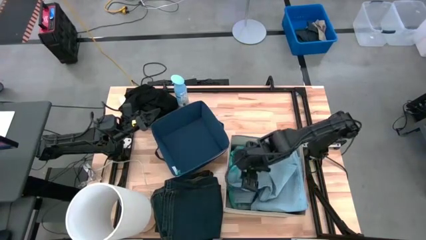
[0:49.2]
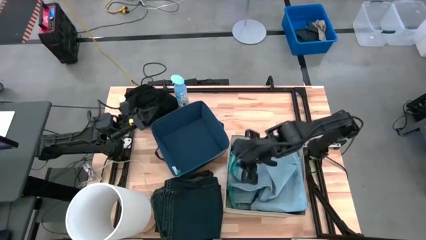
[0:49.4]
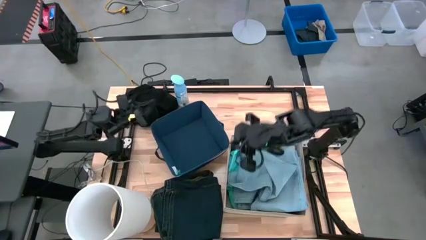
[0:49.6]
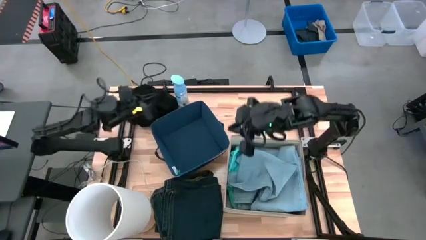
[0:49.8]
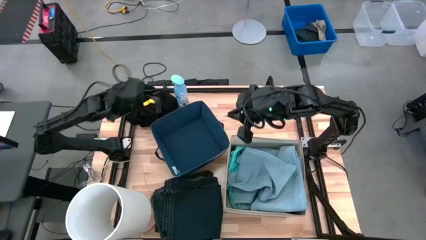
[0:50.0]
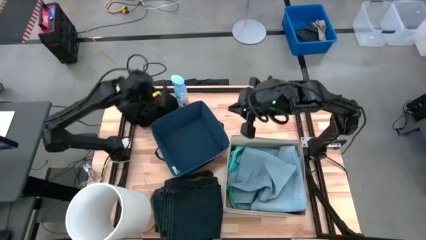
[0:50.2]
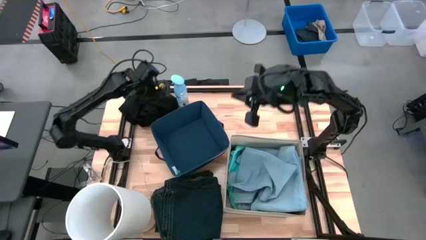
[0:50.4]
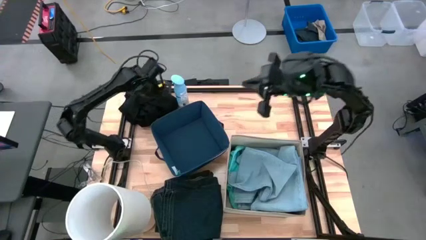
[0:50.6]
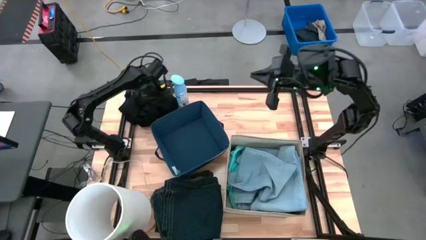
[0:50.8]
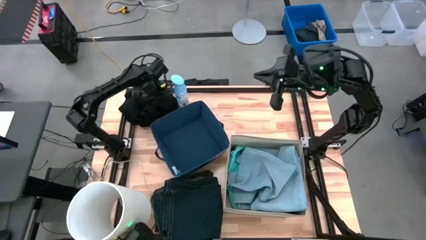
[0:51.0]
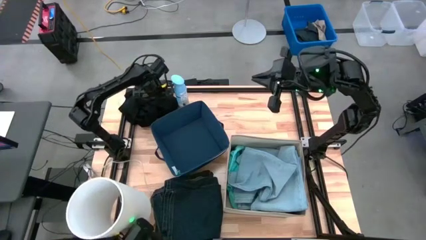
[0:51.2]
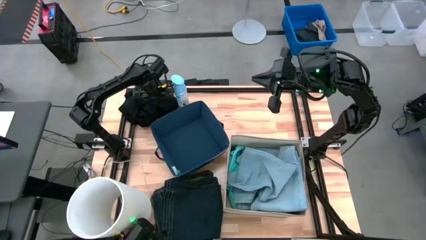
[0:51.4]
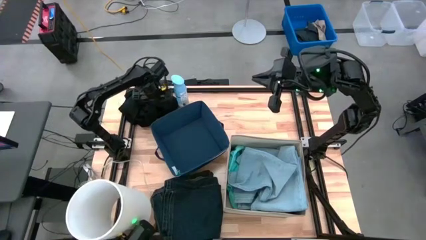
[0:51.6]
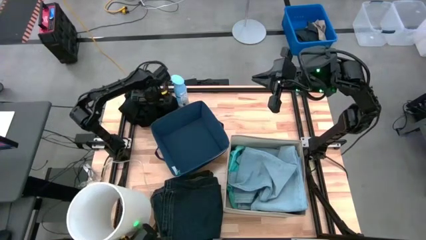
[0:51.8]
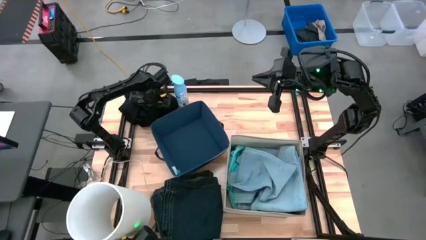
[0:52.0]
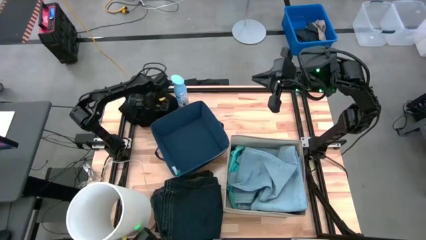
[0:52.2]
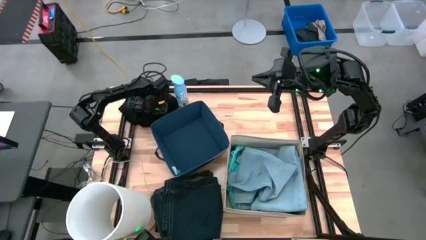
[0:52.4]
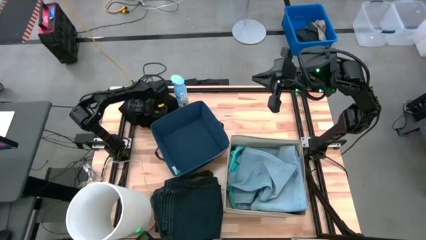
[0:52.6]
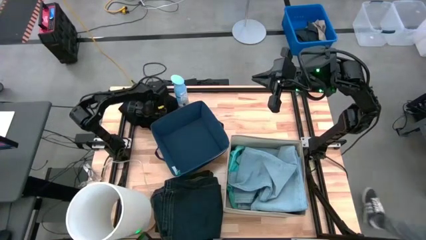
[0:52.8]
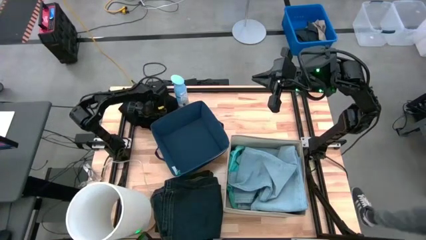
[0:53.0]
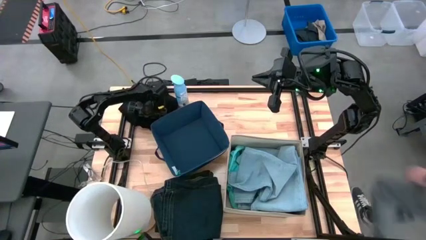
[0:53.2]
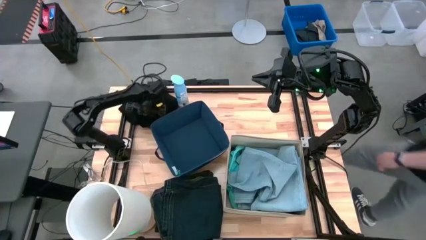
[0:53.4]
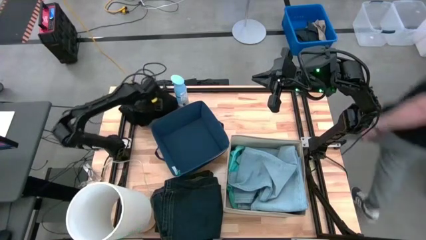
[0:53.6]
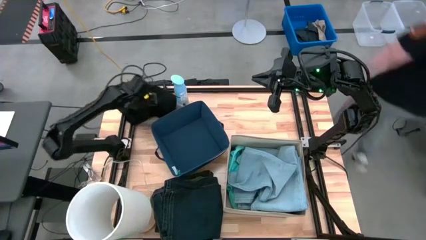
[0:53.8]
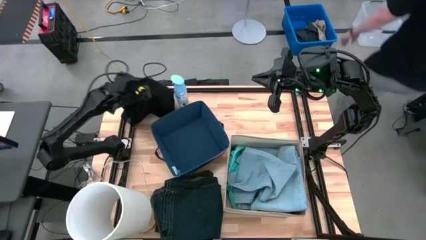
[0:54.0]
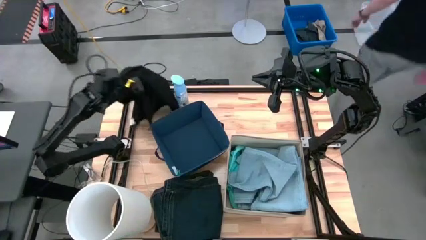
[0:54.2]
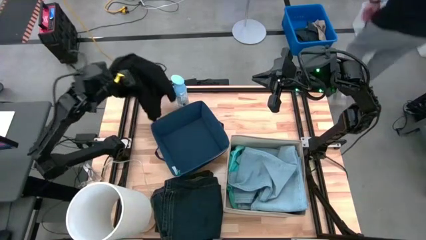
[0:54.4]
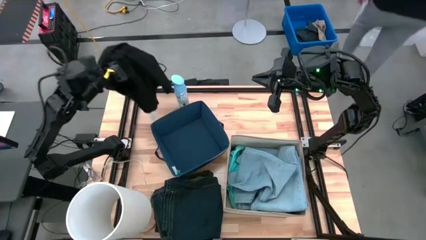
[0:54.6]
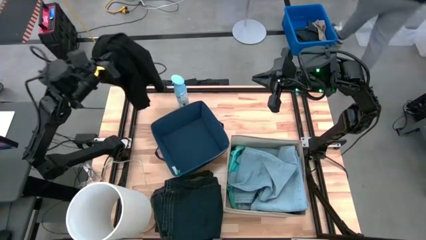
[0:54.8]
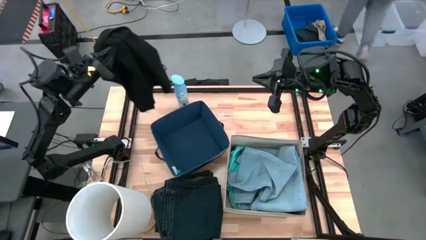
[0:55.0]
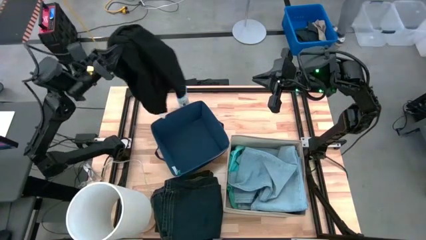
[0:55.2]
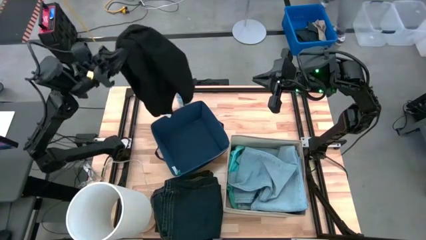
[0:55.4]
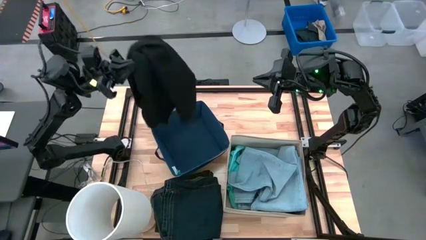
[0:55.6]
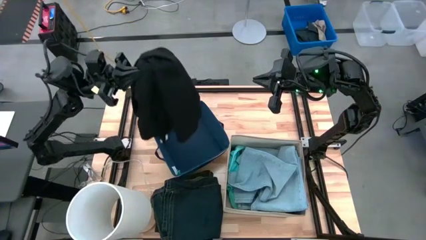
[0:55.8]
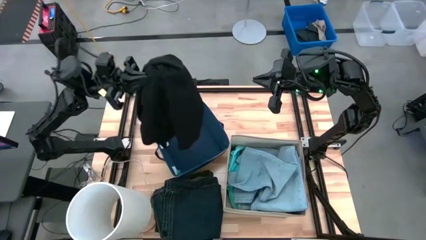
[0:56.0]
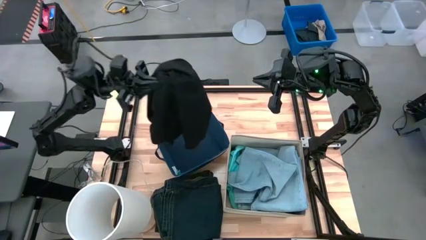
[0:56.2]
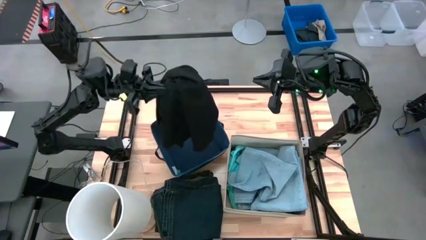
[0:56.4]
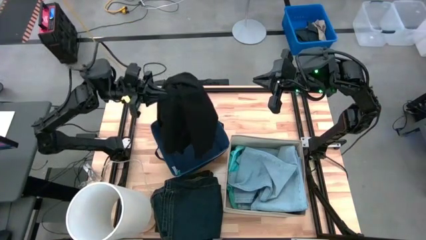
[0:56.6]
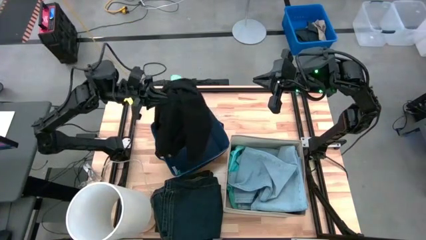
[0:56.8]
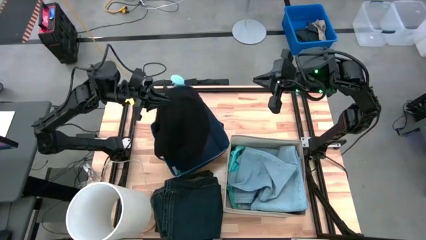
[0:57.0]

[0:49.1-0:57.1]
Task: Sort clothes
Put the black shirt into the blue laundry organizer

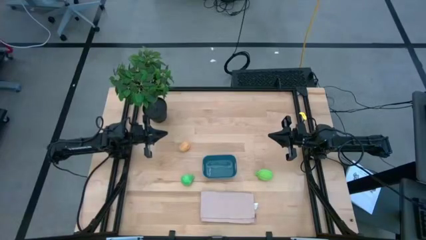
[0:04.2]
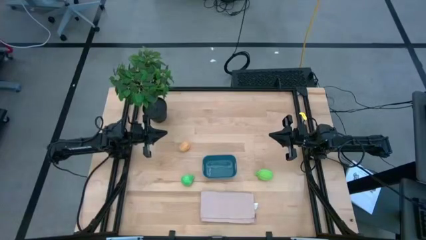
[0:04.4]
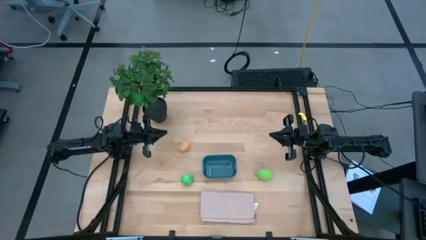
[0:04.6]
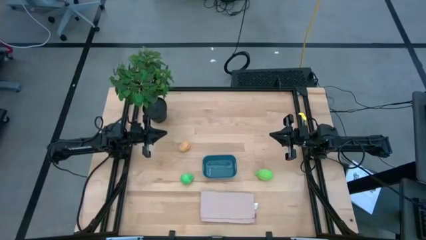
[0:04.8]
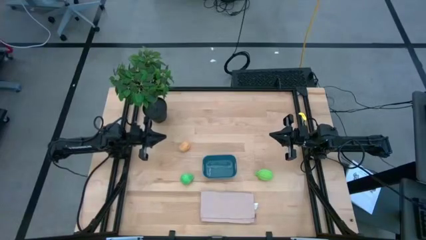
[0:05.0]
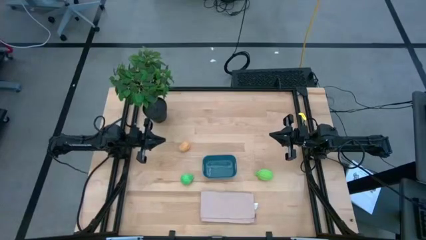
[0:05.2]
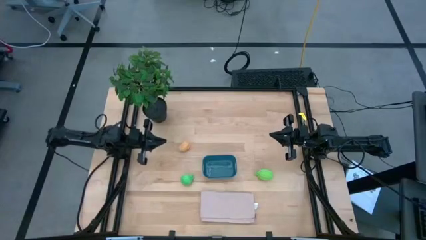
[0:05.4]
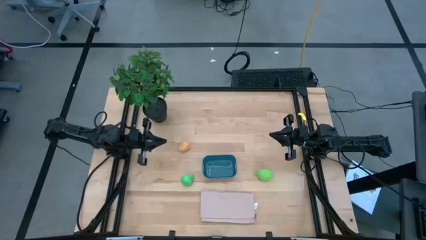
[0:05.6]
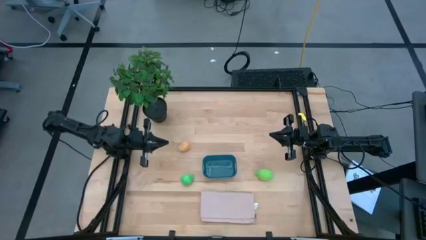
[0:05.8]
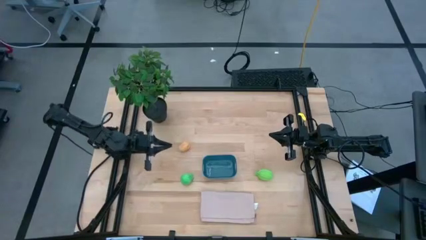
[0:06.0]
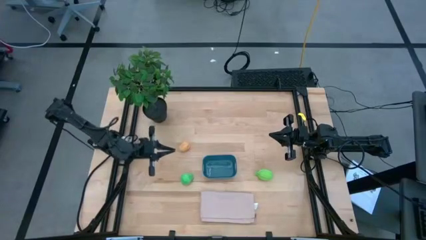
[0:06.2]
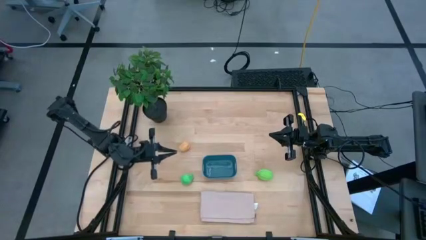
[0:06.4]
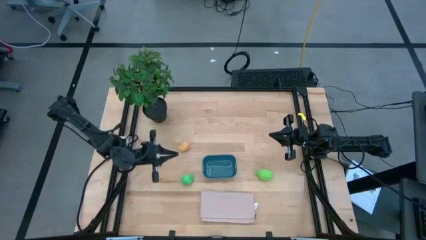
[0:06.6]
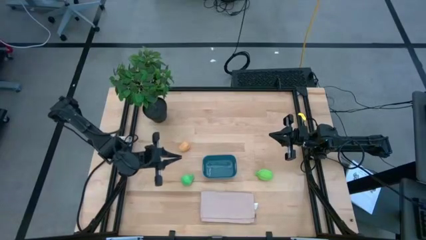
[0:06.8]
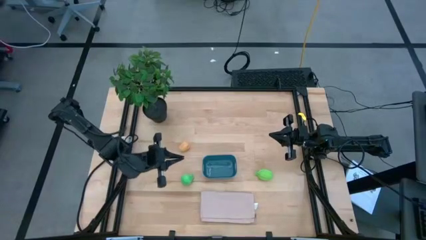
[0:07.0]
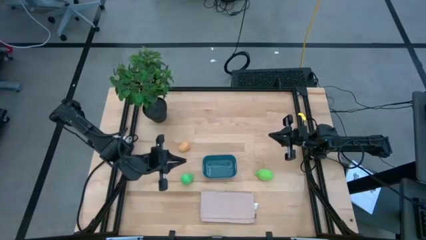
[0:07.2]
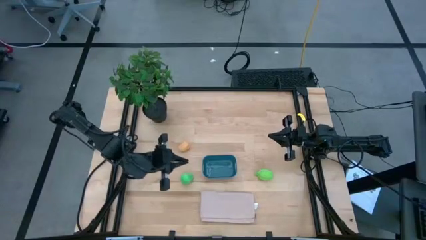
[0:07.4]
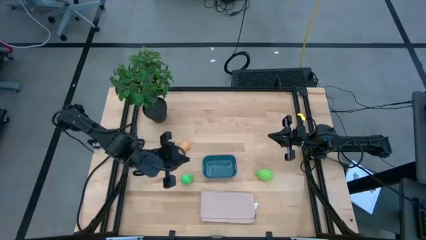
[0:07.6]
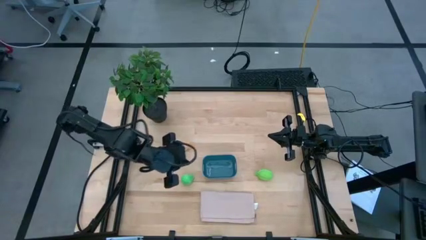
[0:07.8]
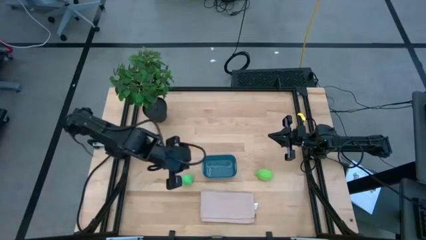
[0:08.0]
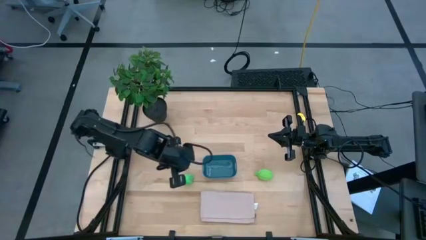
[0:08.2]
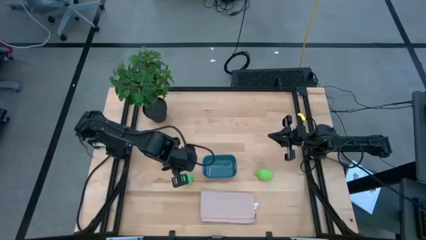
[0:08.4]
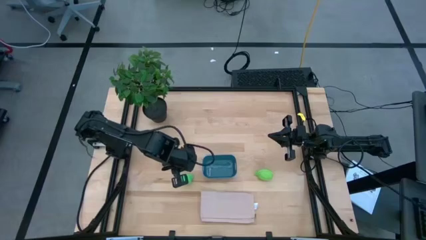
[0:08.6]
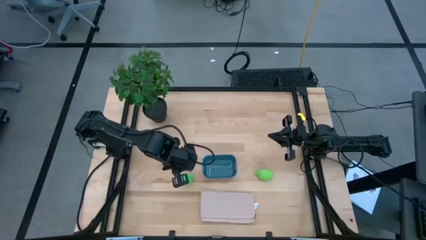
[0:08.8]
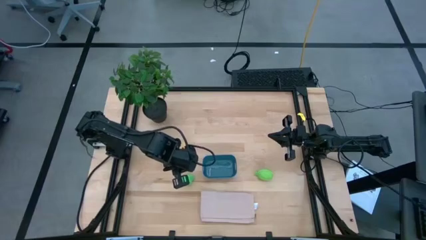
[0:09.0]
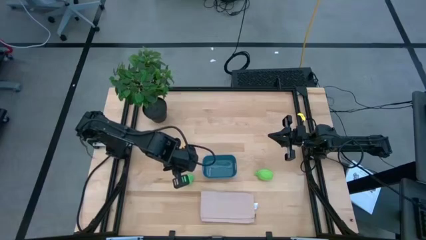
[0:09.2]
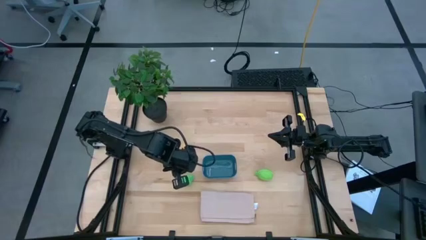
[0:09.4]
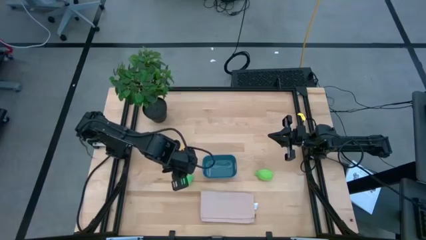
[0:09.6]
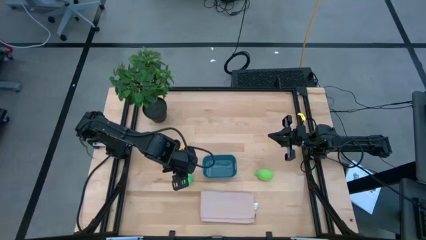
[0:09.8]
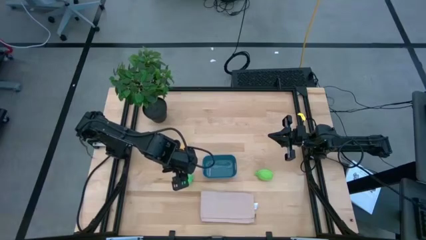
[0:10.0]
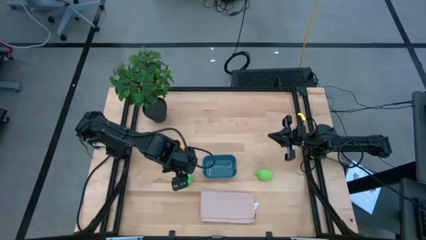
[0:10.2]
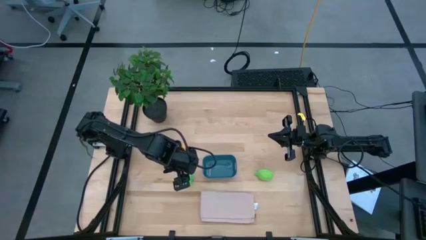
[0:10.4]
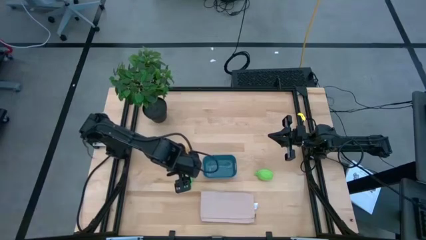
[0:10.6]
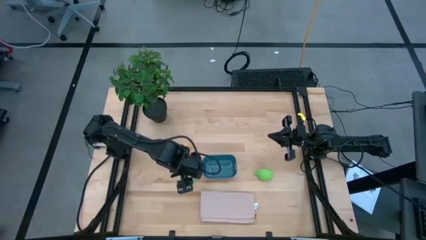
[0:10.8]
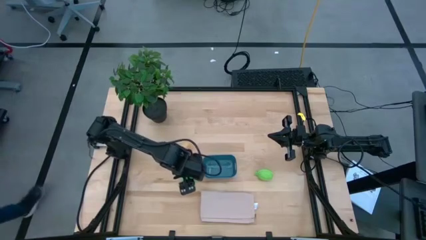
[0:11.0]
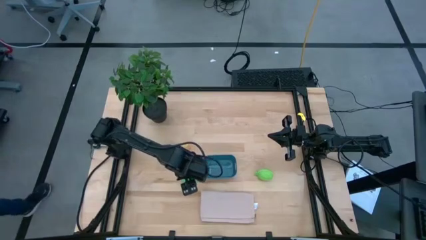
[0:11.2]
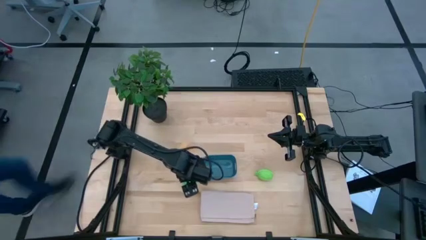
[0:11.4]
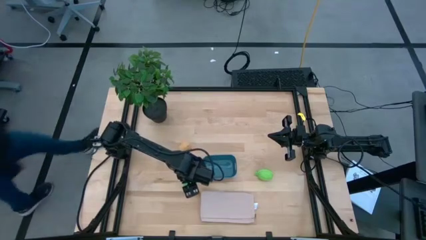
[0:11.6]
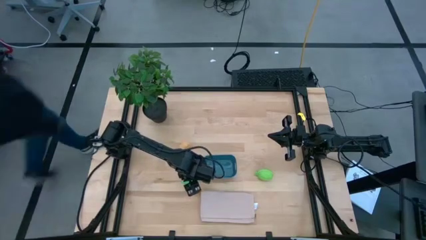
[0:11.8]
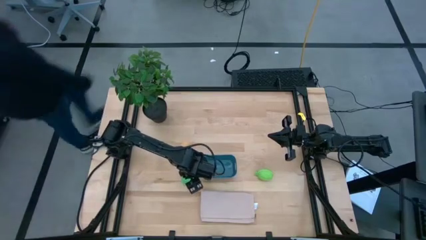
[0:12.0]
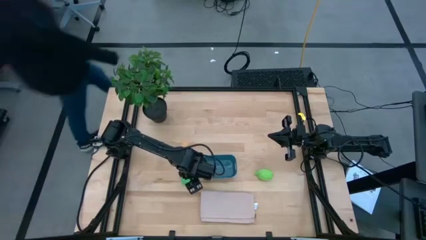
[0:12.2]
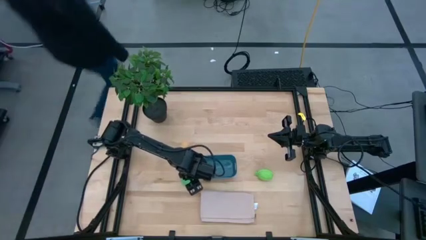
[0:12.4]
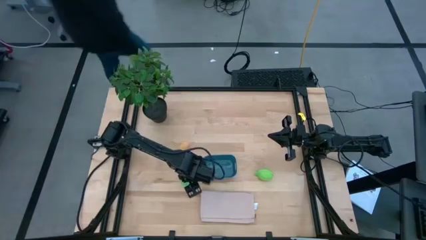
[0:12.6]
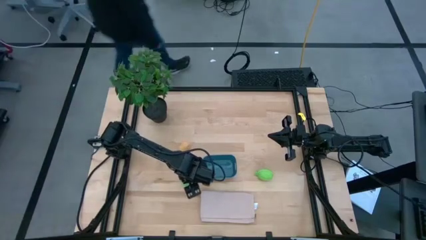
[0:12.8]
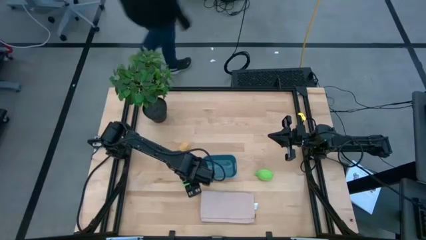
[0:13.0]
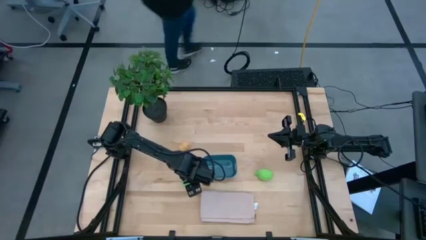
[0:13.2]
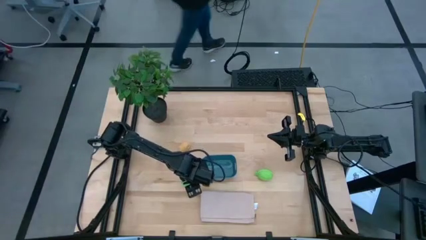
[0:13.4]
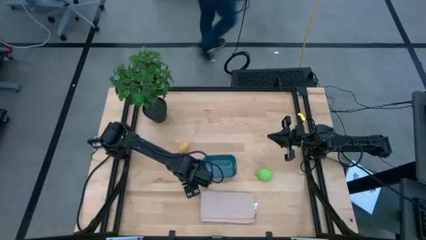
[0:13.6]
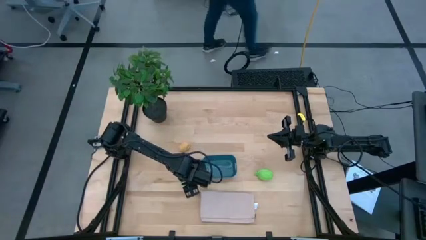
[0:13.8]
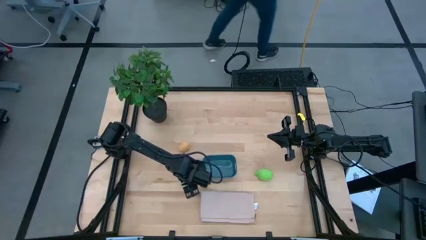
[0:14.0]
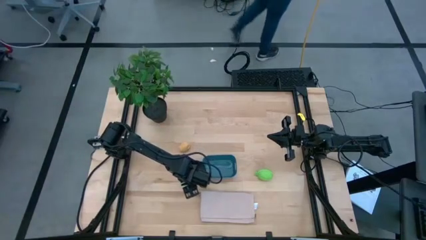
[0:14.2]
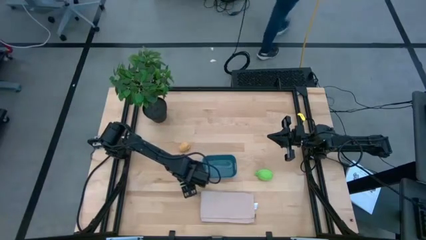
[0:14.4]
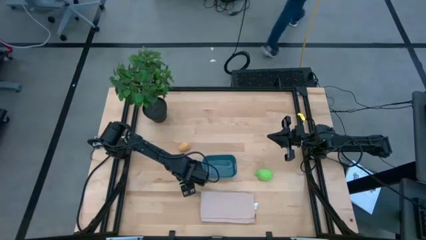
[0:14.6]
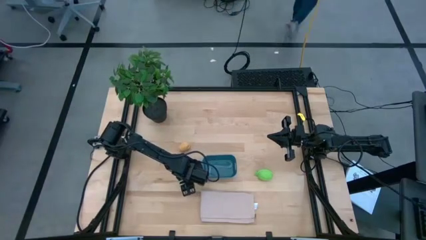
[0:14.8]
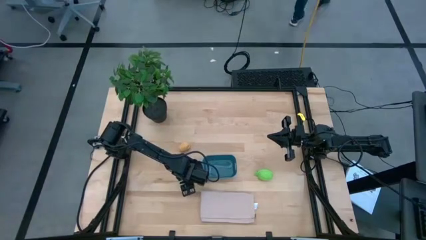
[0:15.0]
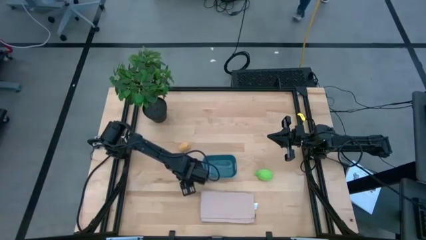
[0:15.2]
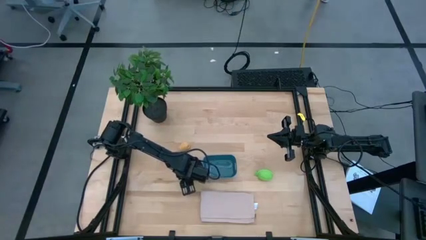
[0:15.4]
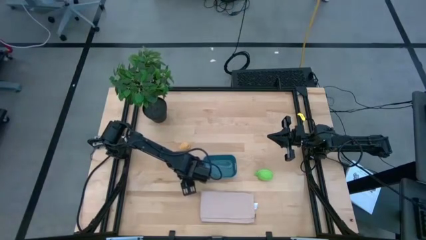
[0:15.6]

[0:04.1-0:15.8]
Task: Pick and placing Produce into tupperware
Put the green pear into the blue bin
